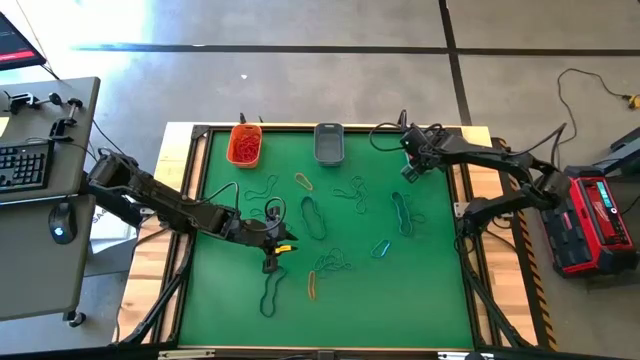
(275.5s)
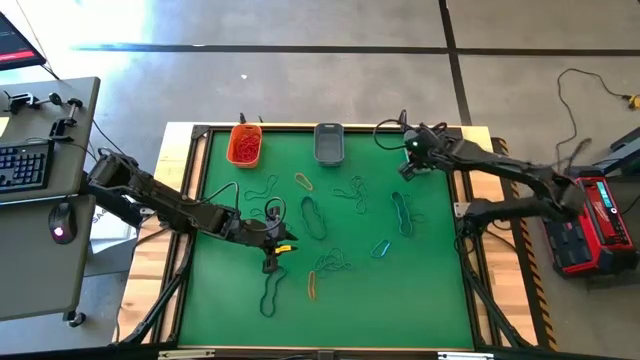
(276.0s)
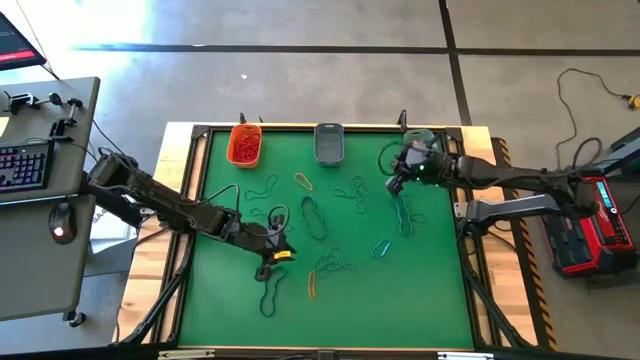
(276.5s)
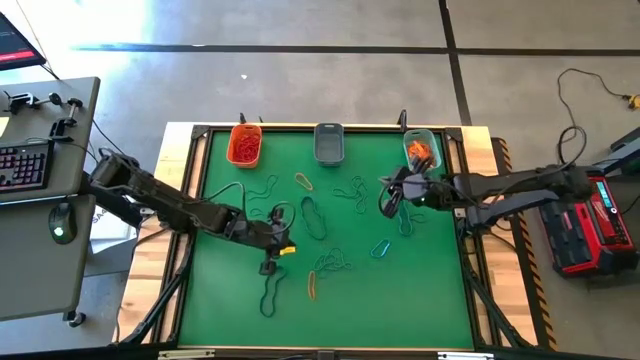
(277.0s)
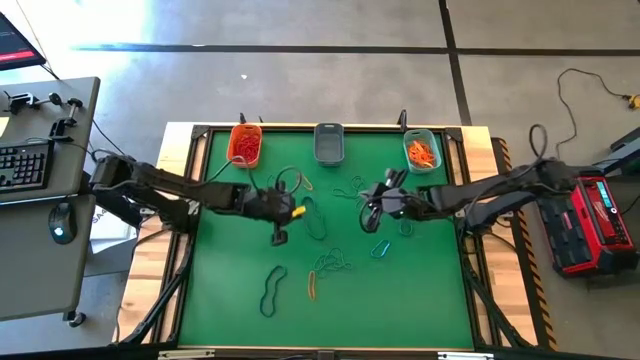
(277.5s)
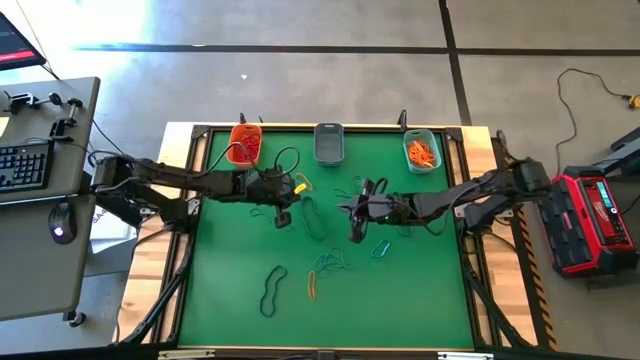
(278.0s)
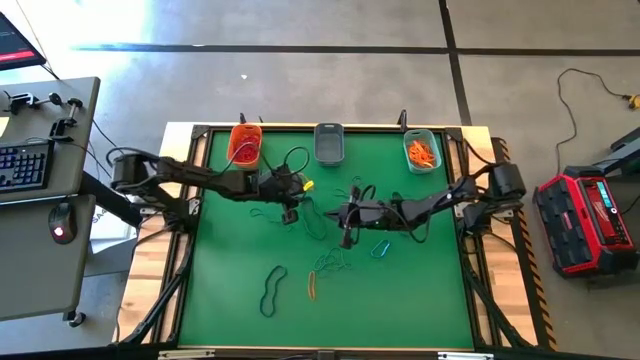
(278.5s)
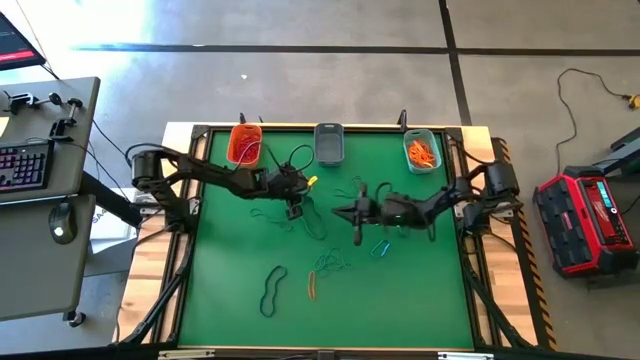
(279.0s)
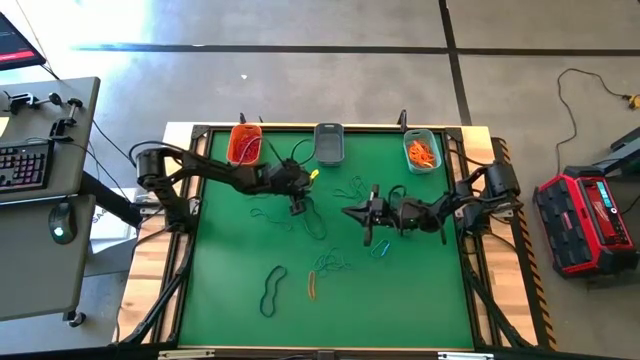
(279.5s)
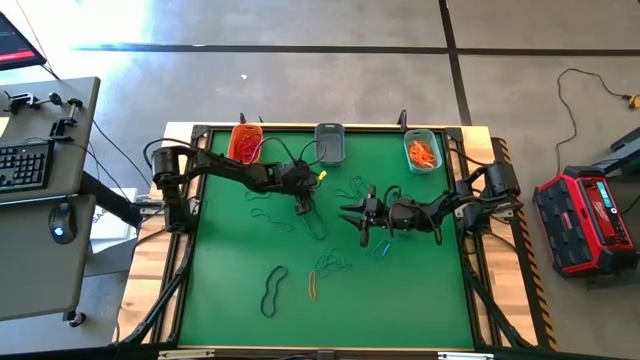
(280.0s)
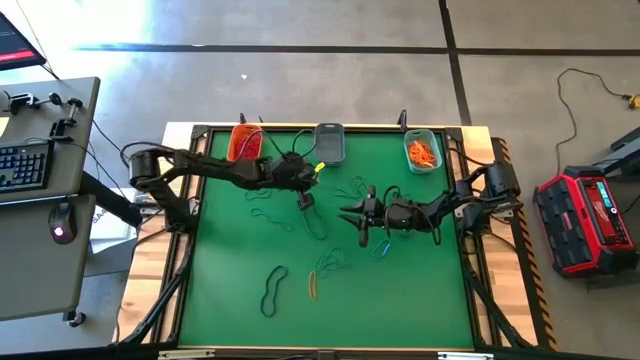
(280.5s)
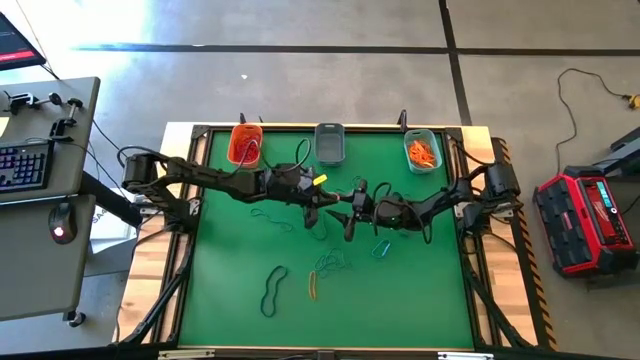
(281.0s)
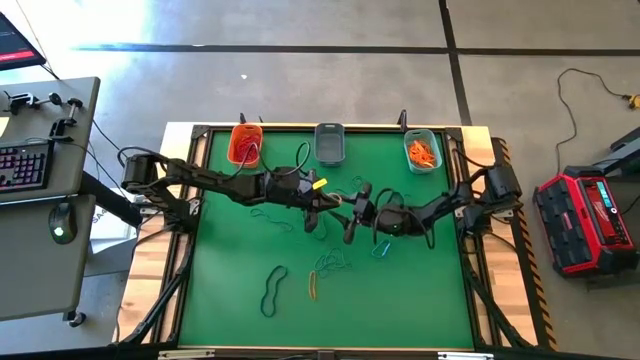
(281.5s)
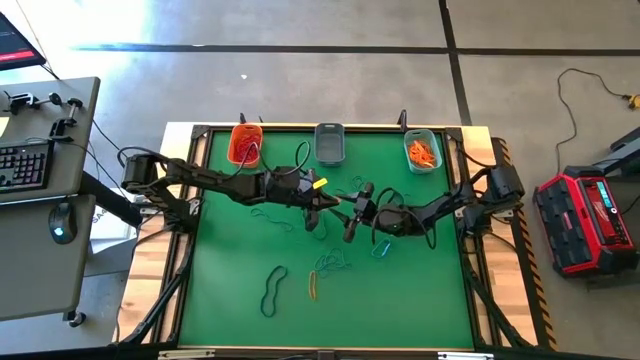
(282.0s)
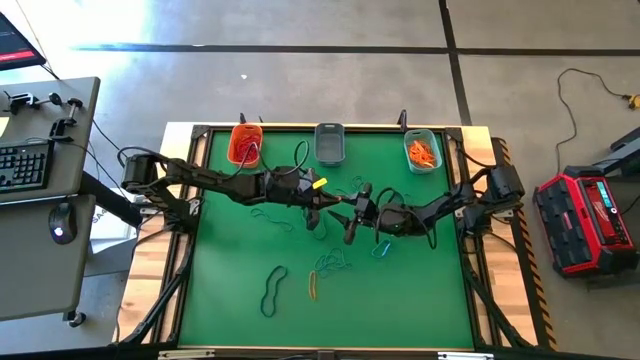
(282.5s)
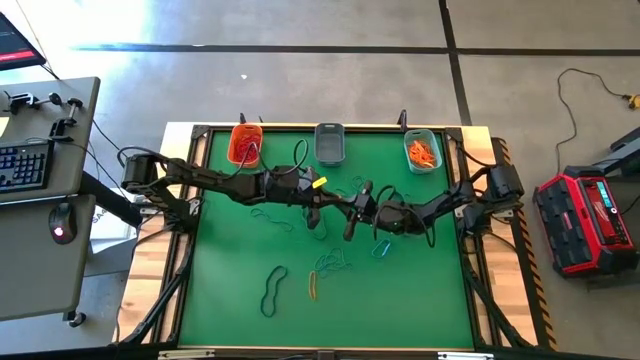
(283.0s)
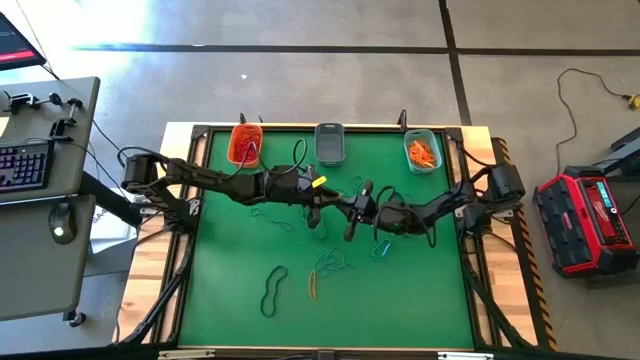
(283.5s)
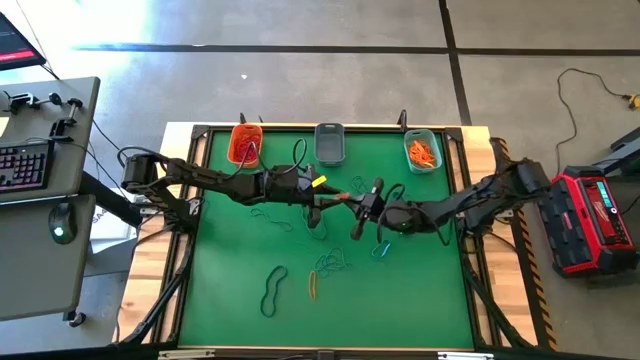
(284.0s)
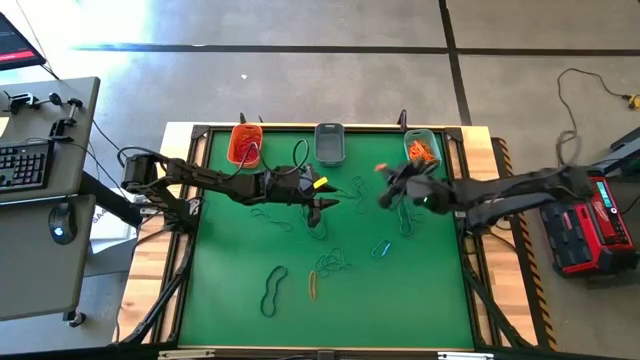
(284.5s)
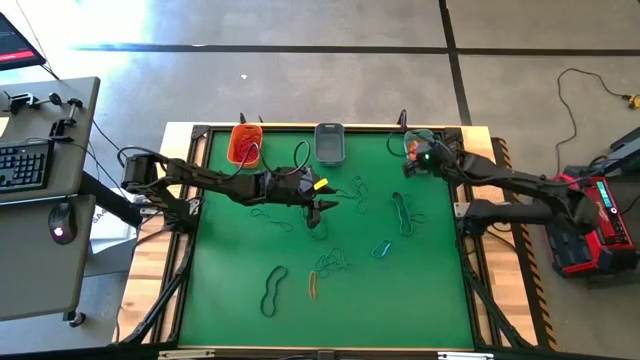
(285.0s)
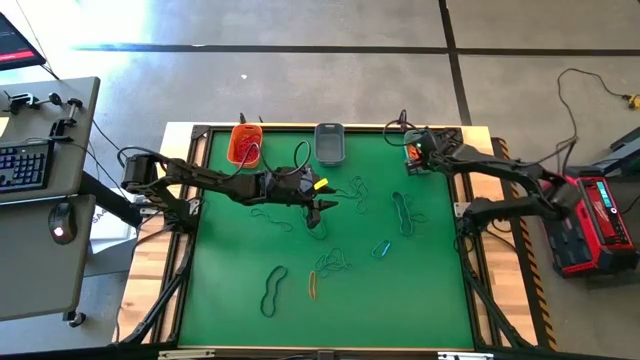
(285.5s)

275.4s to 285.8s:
Task: Sort rubber bands into baskets
Put the orange rubber band into the green bin

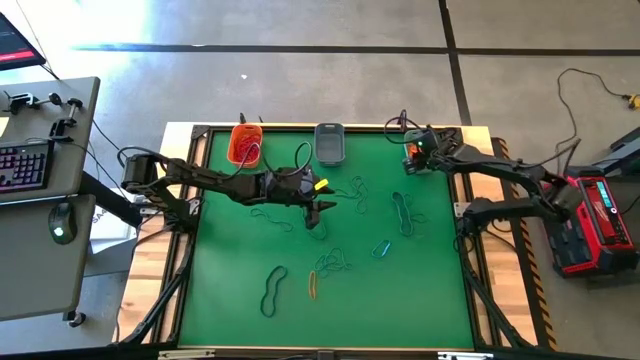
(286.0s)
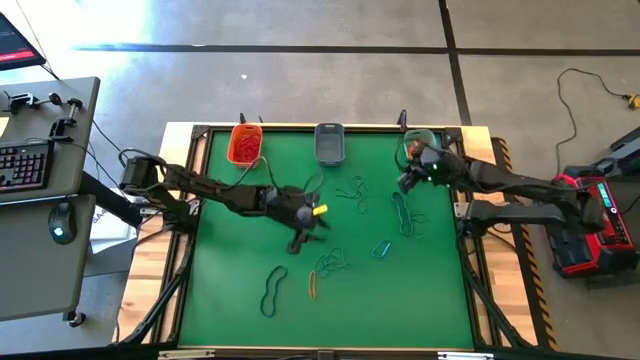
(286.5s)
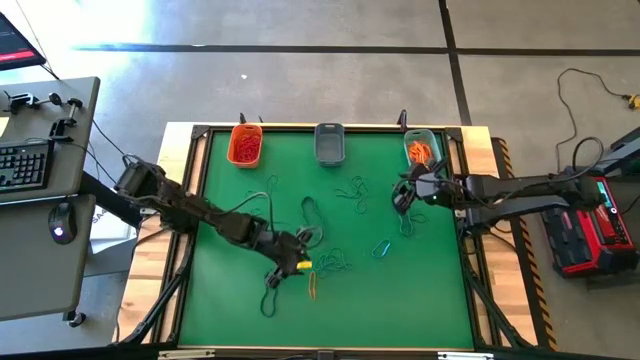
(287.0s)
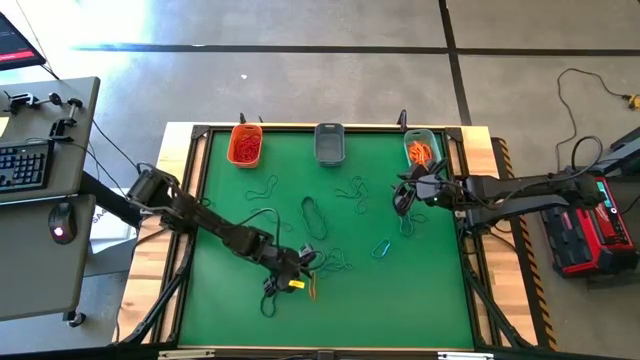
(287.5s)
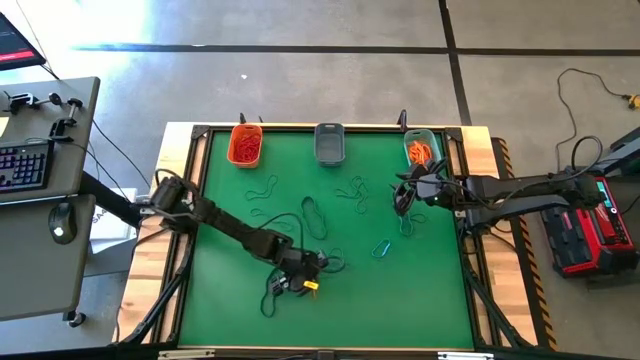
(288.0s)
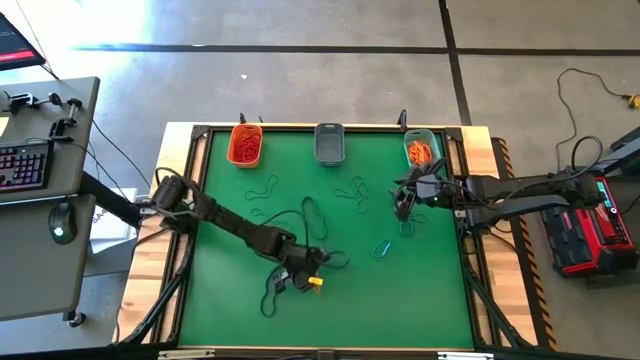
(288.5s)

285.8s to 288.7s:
Put the orange rubber band into the green bin

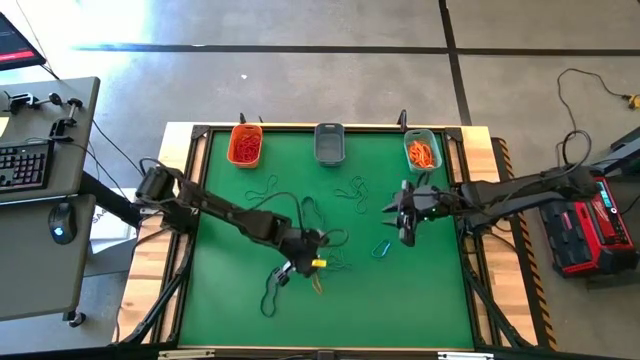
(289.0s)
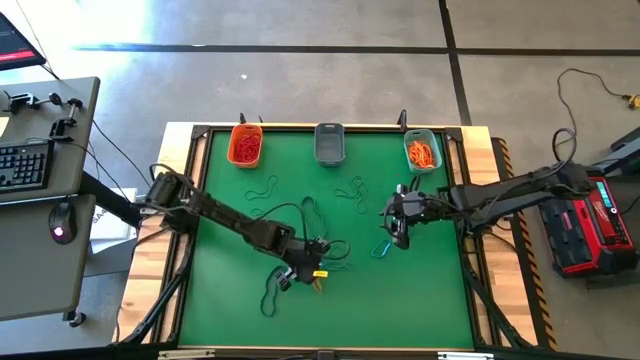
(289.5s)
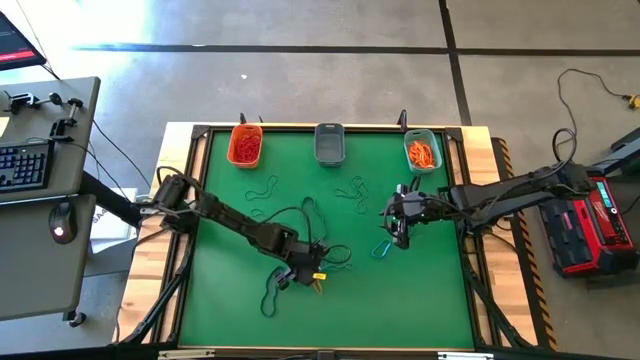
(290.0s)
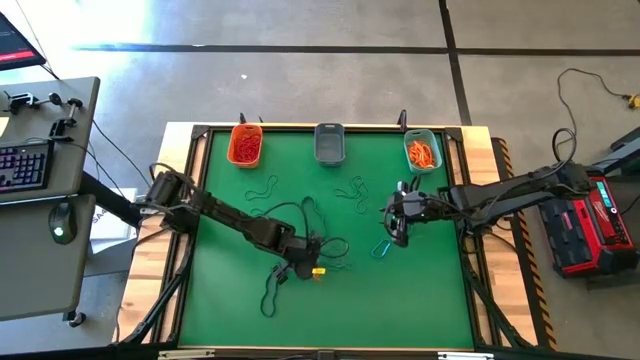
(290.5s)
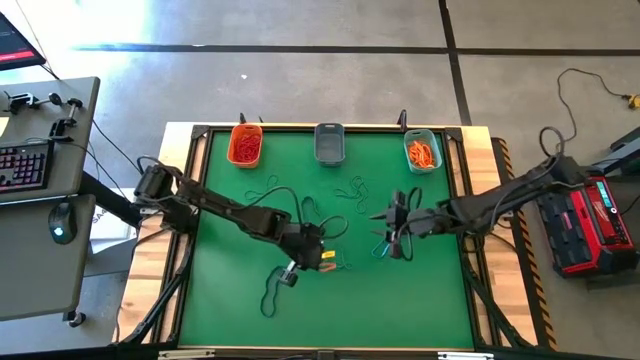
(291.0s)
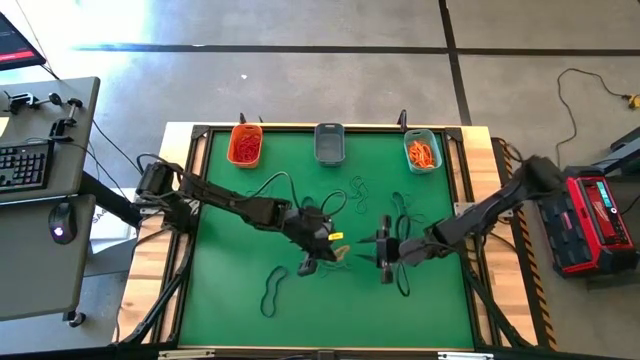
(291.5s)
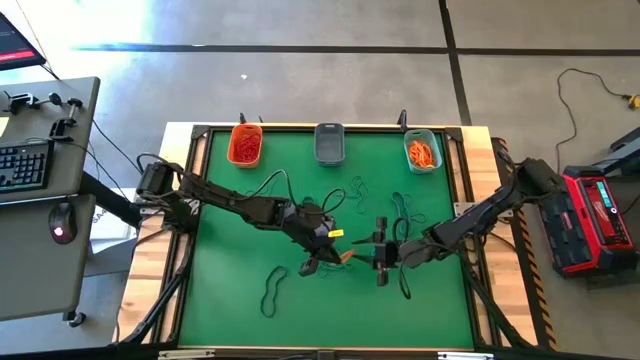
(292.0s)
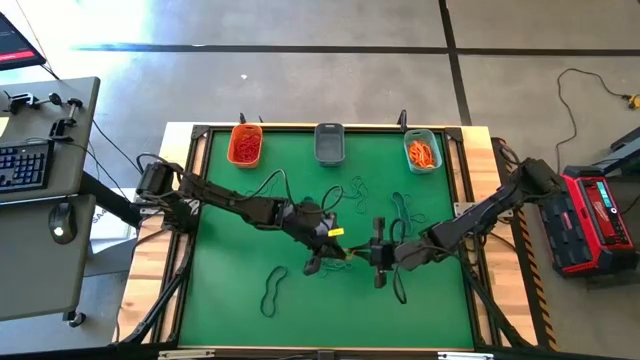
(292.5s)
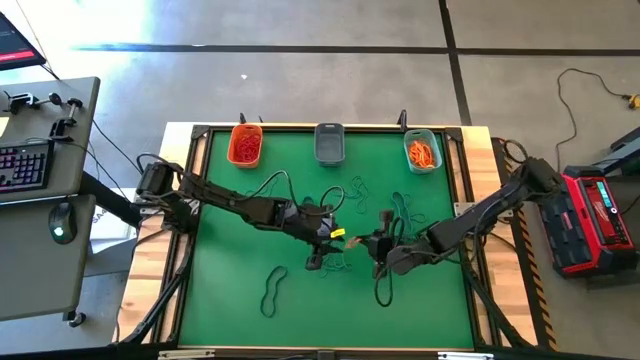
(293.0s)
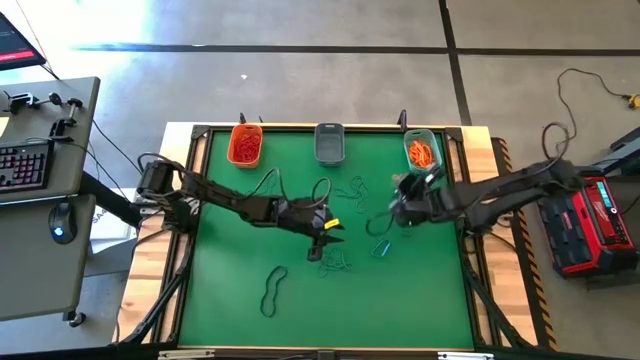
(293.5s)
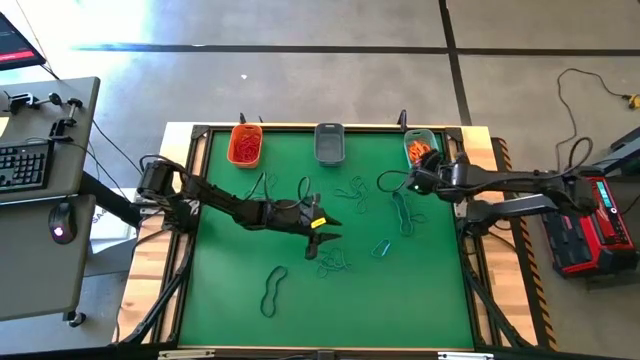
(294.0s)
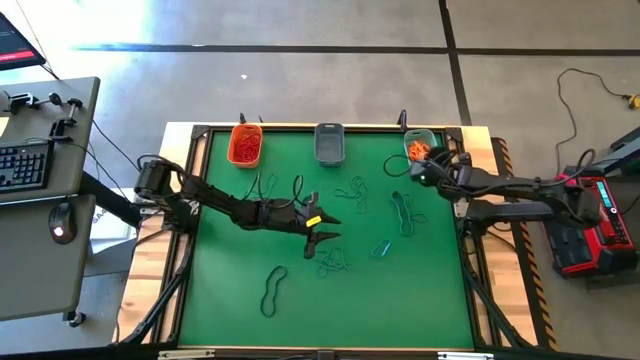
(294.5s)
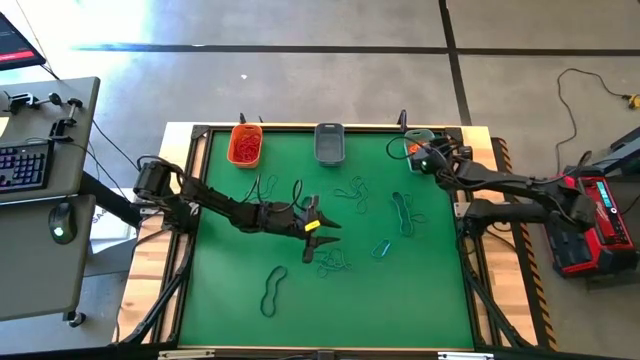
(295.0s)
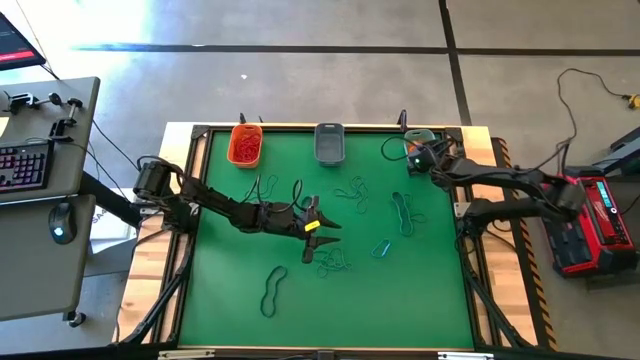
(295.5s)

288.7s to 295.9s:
Put the orange rubber band into the green bin
